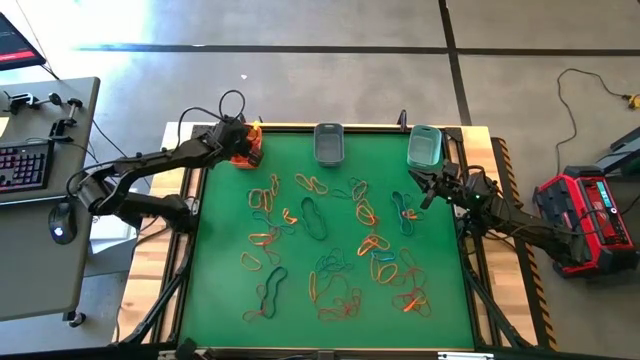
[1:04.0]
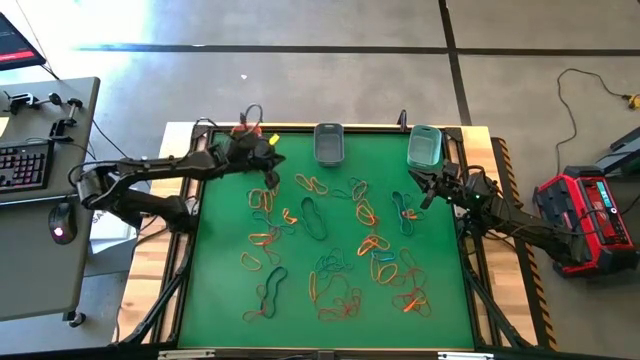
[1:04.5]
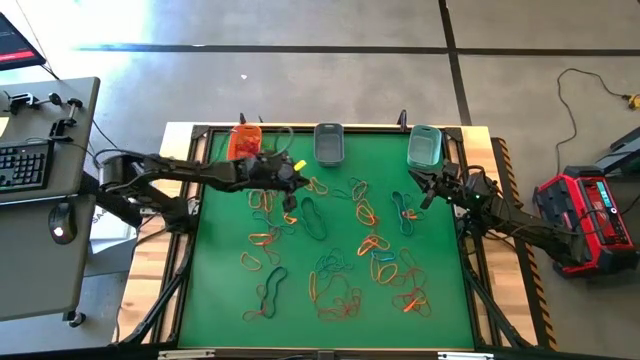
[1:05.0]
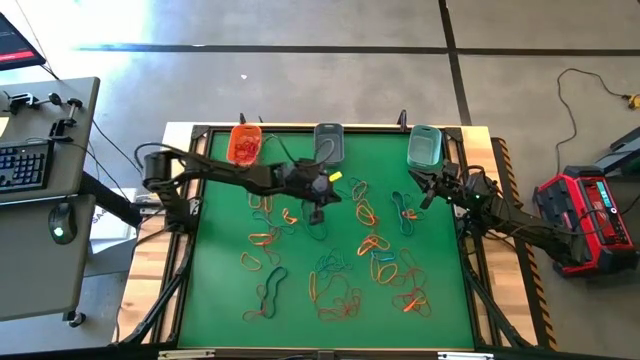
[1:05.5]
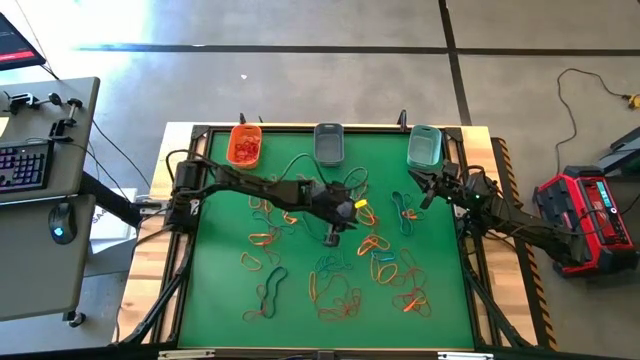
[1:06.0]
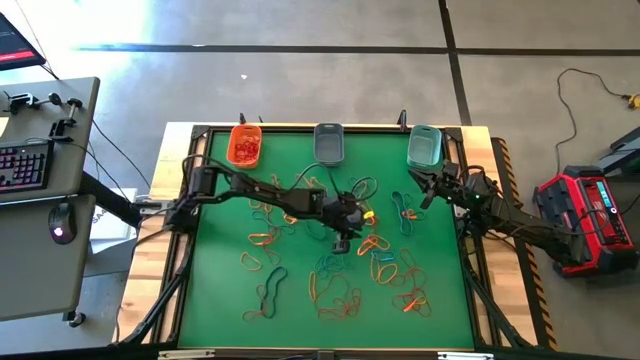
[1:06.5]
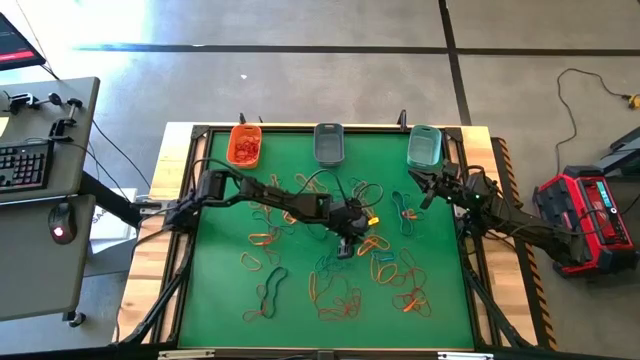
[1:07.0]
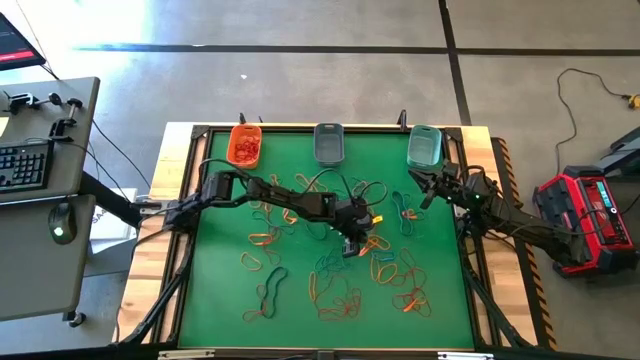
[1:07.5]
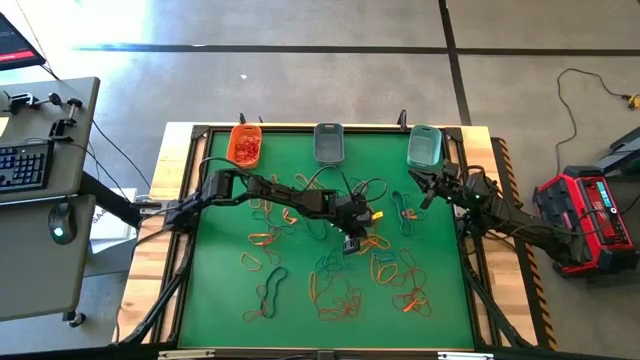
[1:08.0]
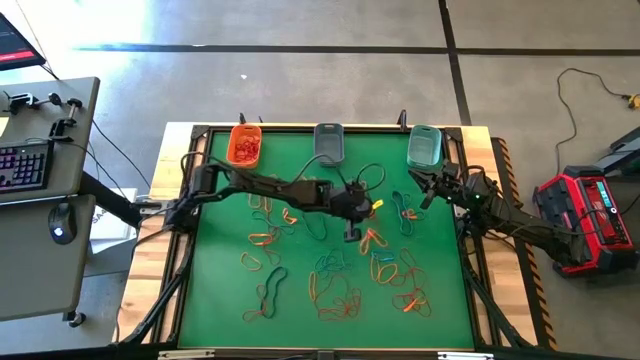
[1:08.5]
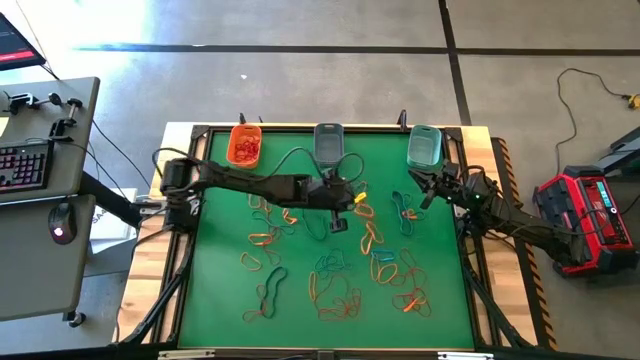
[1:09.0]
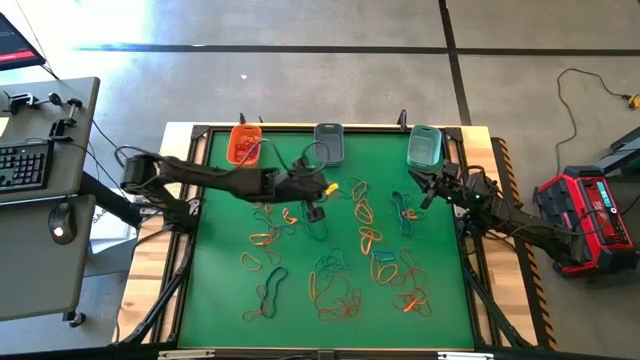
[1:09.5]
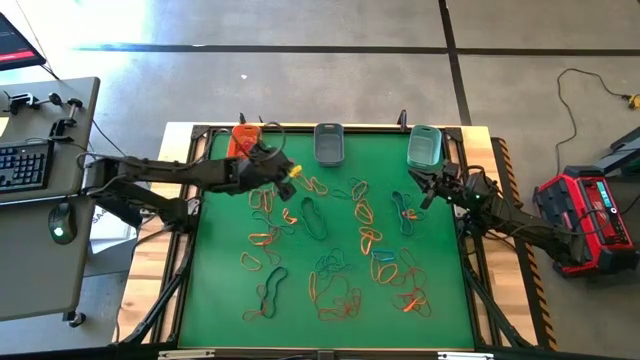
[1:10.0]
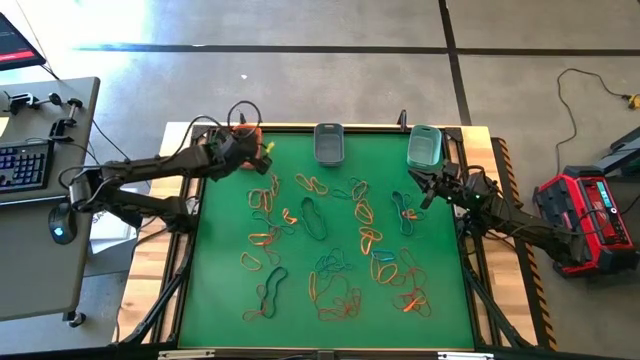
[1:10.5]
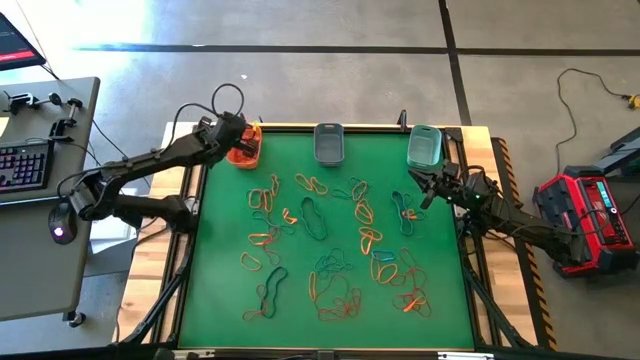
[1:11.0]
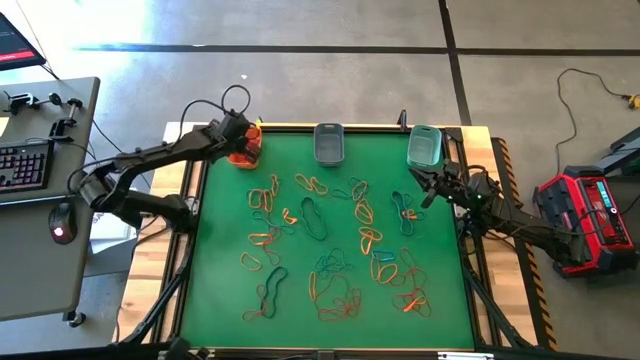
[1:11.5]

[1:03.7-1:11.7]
Task: Sort rubber bands into baskets
Put the red rubber band into the orange bin

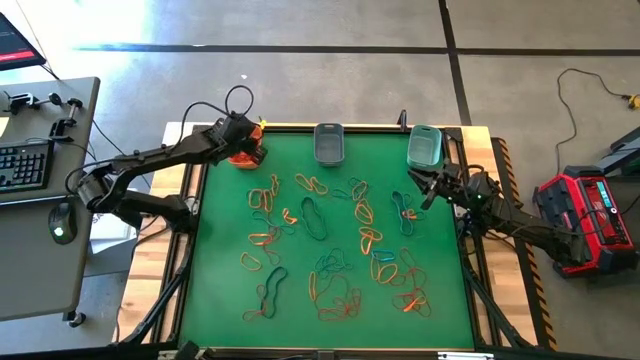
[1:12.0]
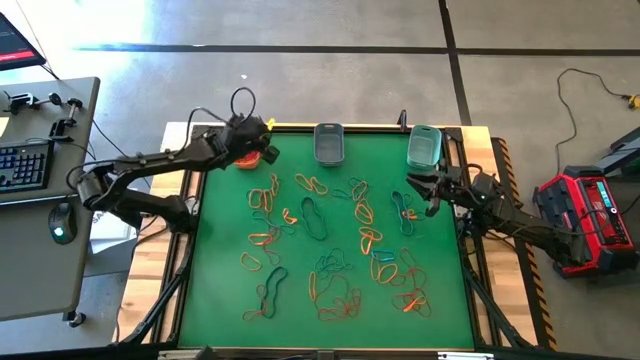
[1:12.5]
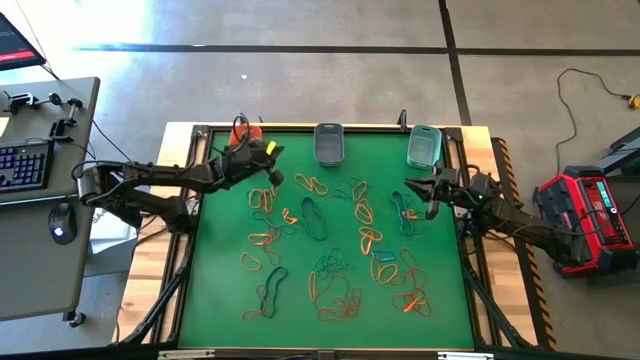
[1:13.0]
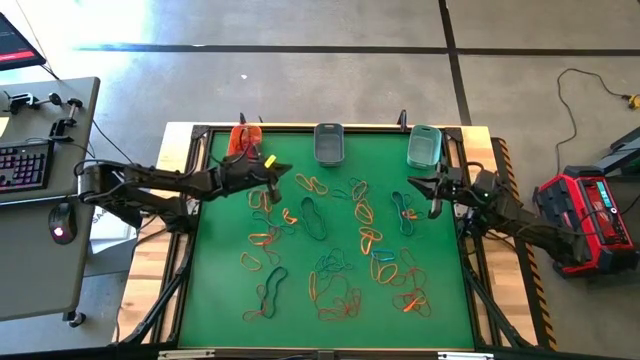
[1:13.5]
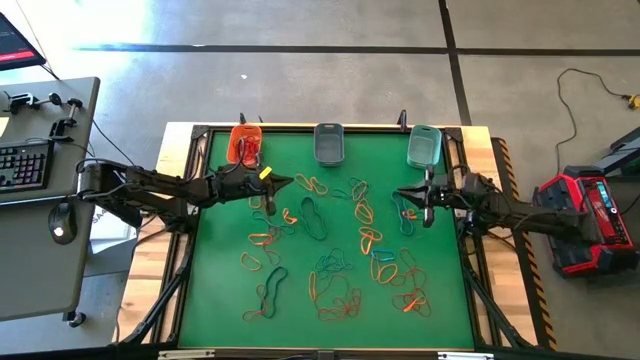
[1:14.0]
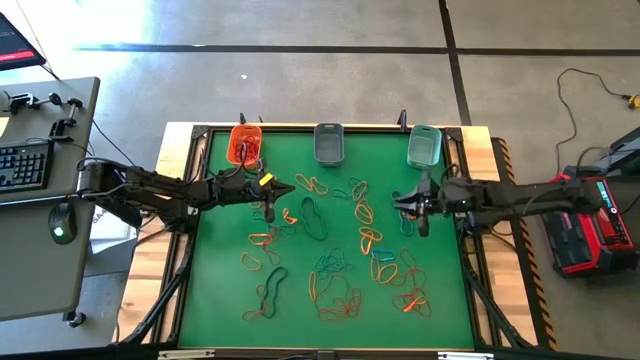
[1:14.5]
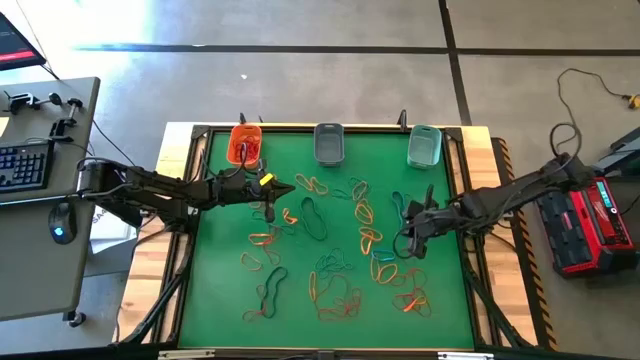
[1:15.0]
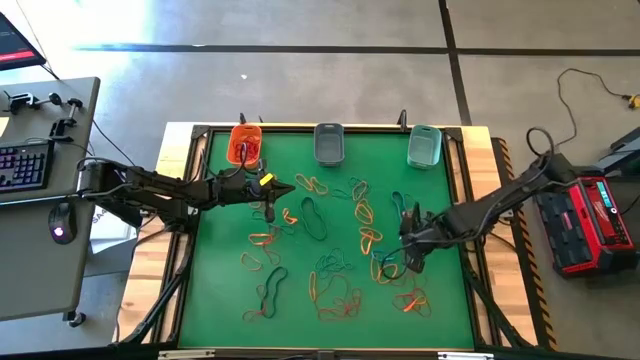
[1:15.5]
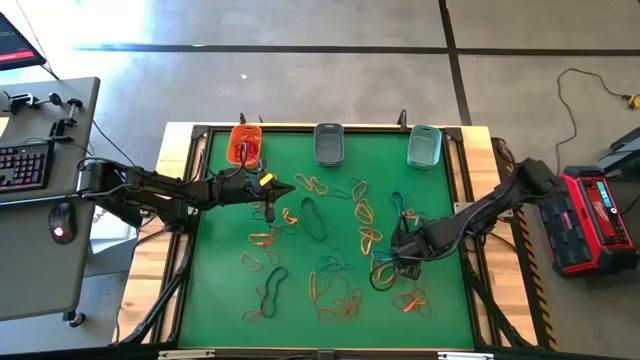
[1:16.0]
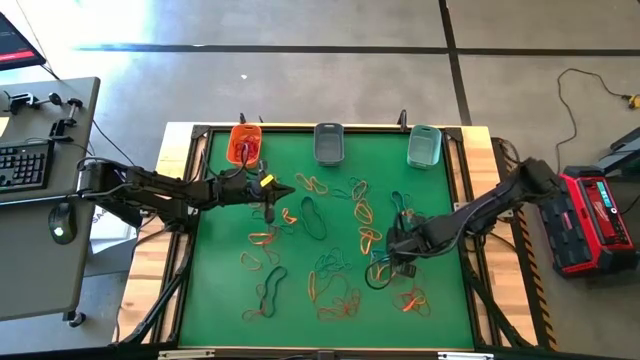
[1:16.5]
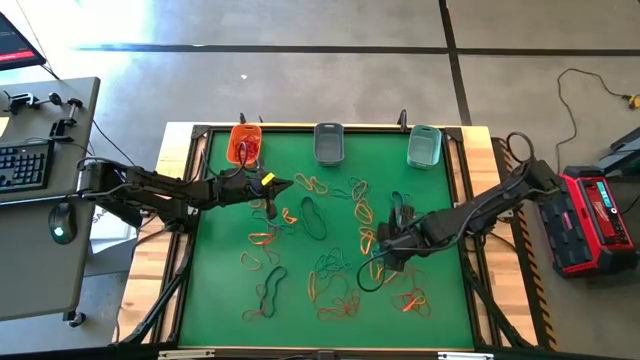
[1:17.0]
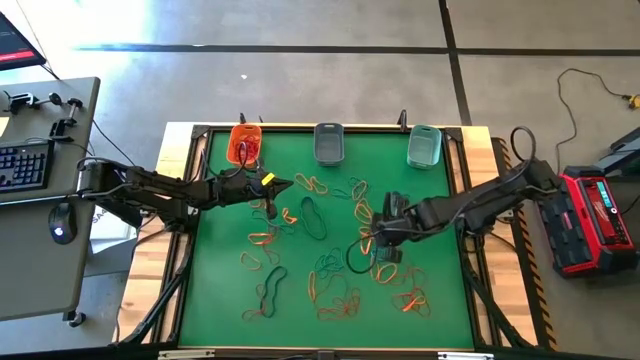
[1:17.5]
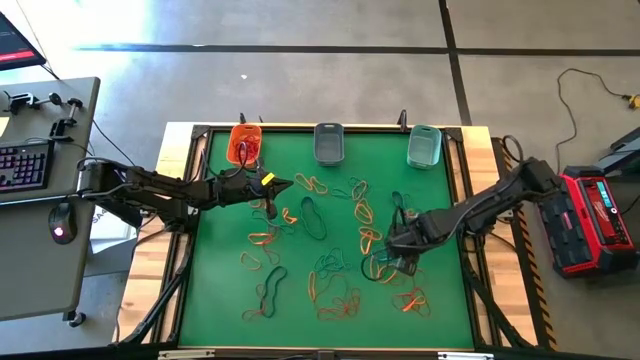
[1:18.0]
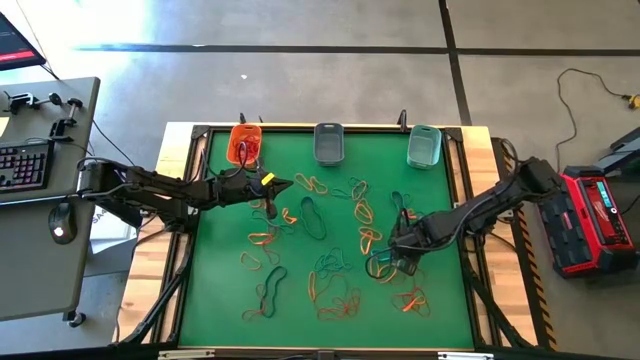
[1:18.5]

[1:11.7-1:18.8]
Put the red rubber band into the orange bin

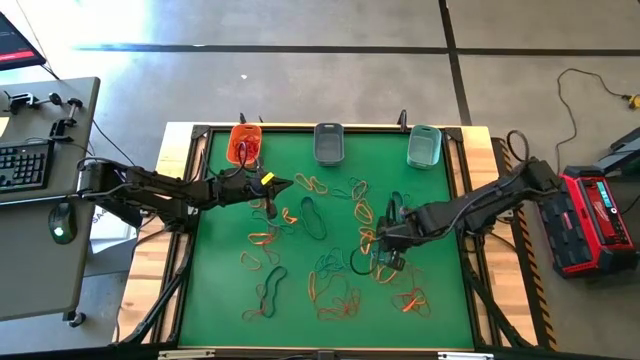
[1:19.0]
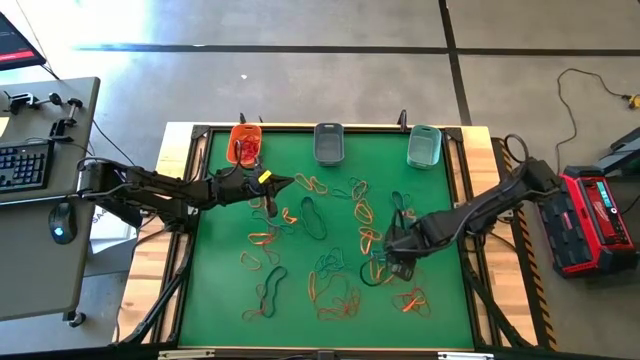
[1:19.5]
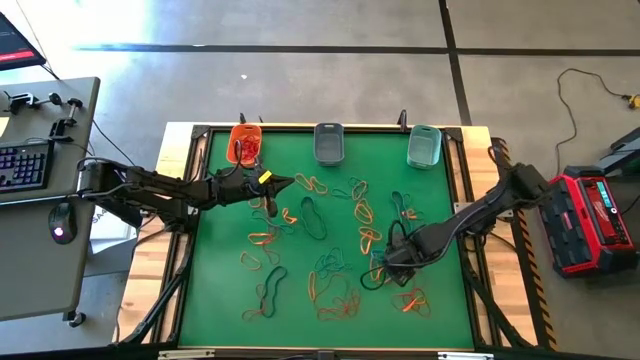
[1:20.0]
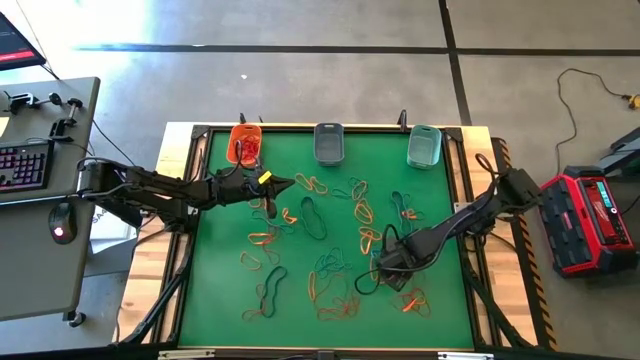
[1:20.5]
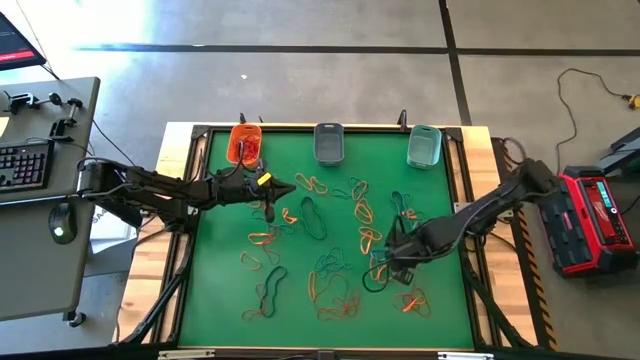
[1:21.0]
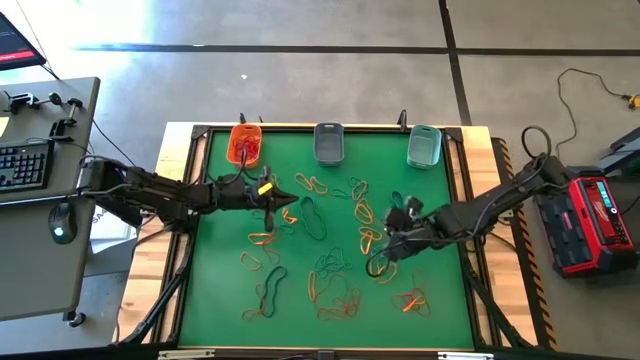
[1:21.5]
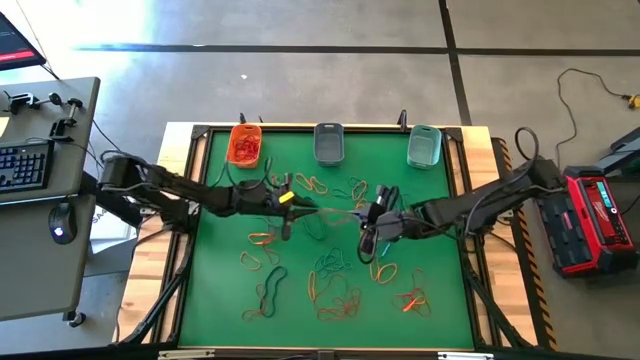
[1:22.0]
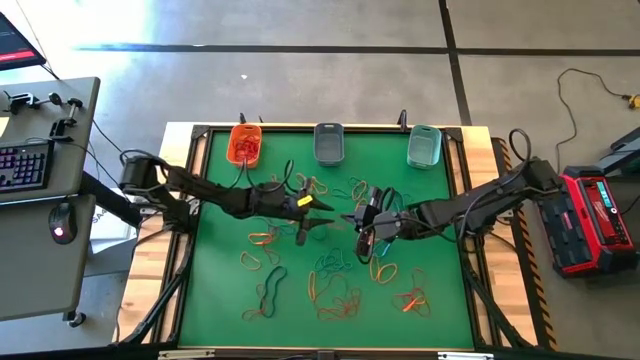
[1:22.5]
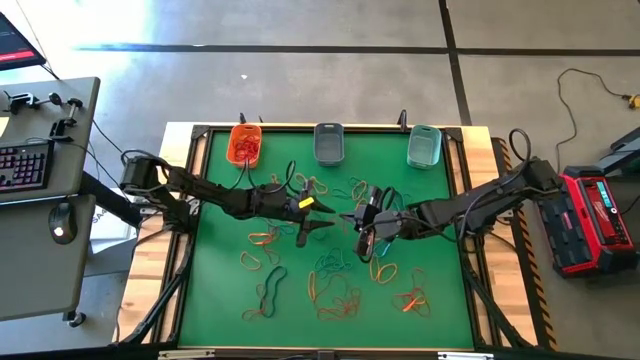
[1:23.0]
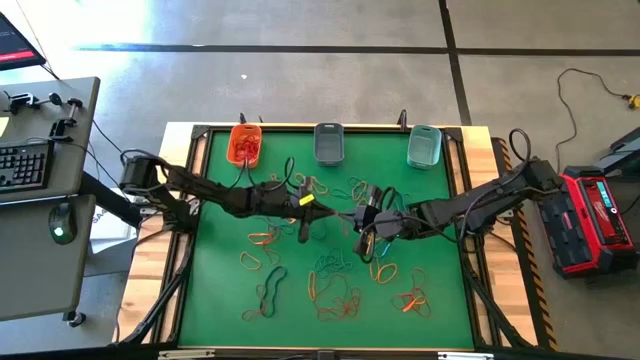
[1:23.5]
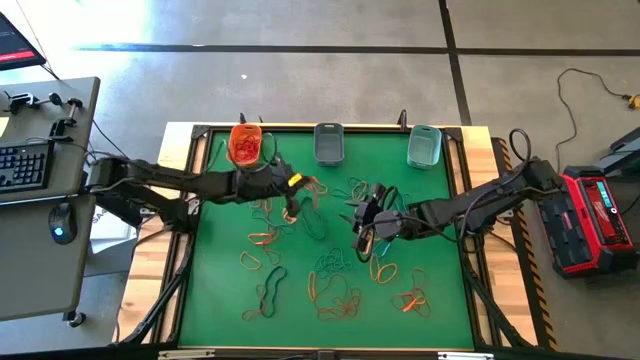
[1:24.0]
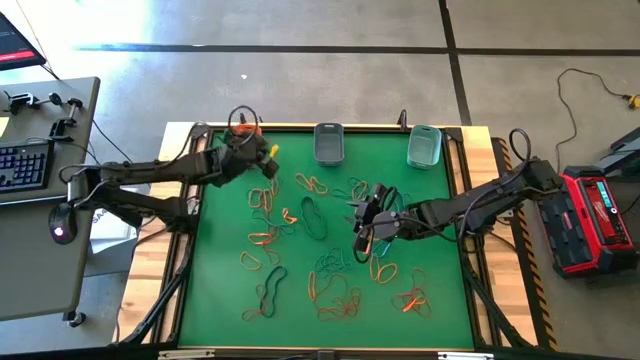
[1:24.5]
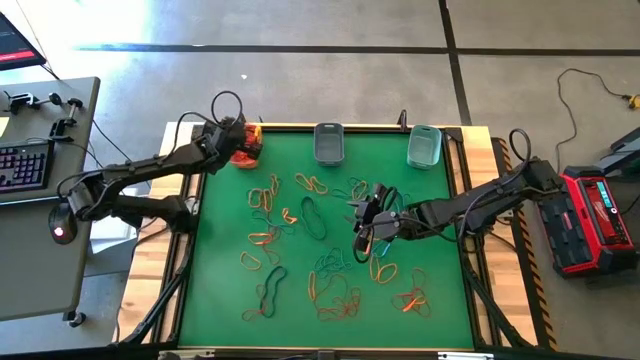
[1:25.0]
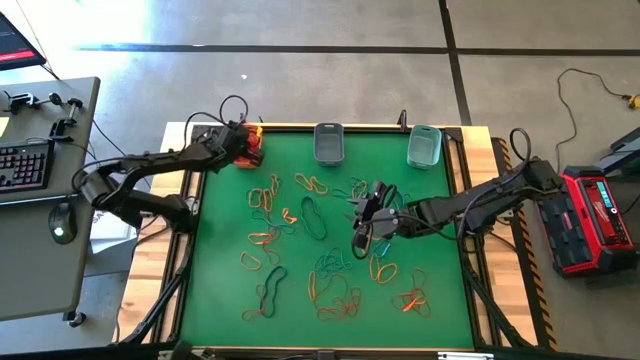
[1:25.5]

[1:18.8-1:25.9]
Put the red rubber band into the orange bin
